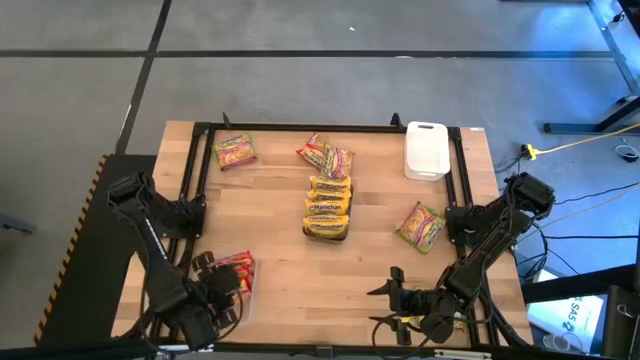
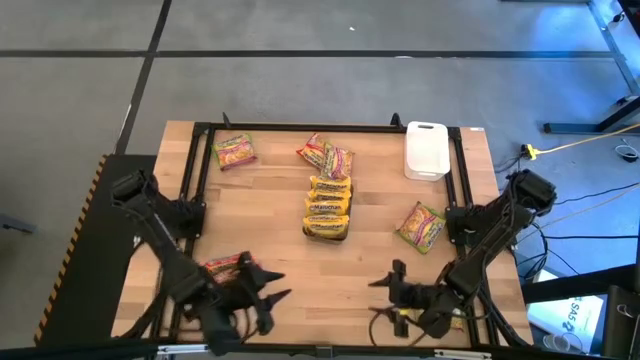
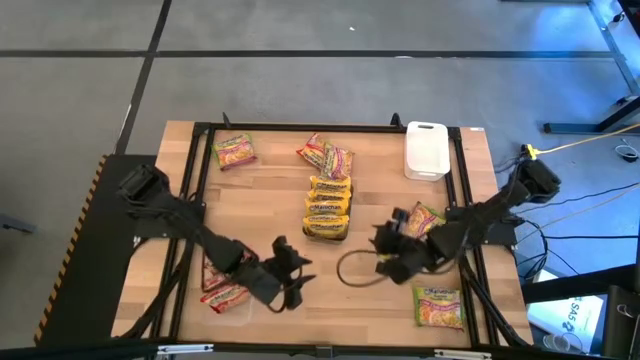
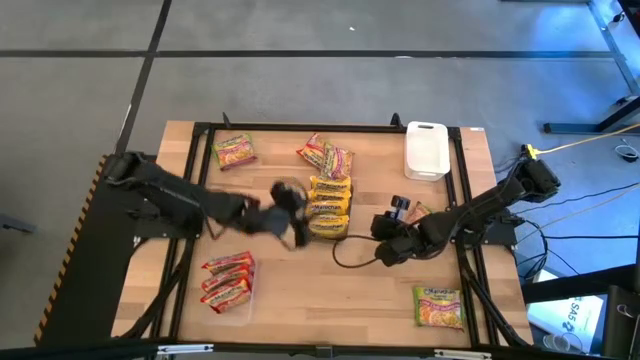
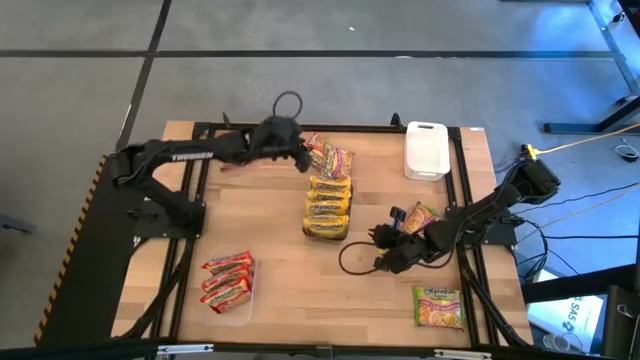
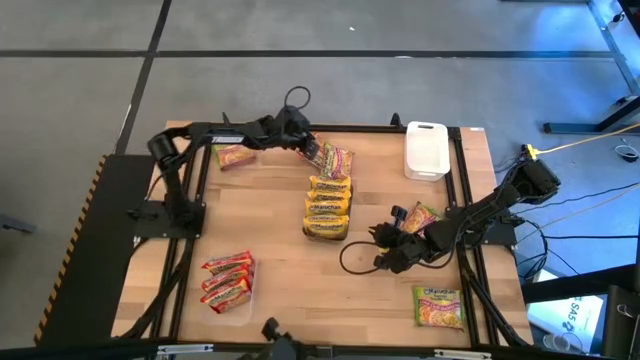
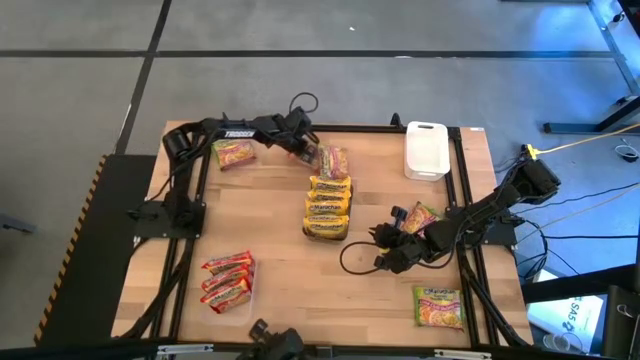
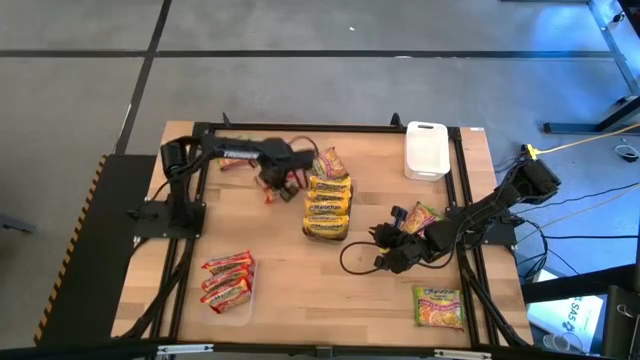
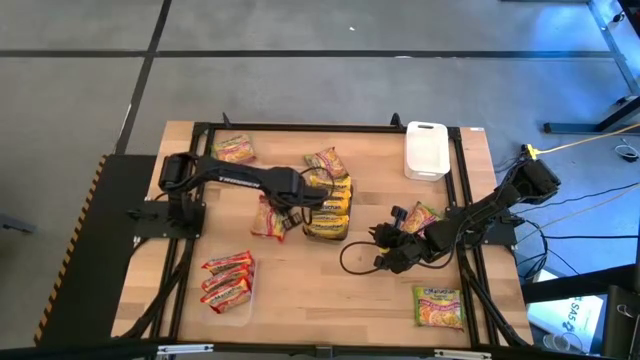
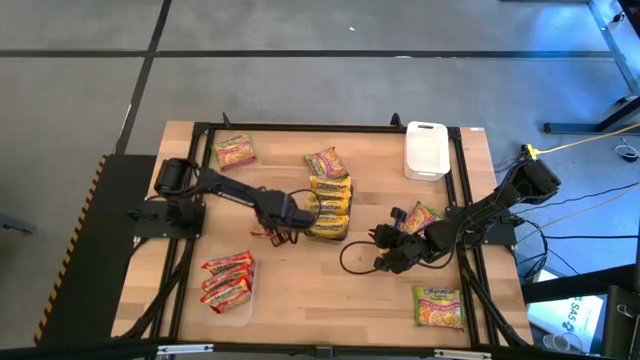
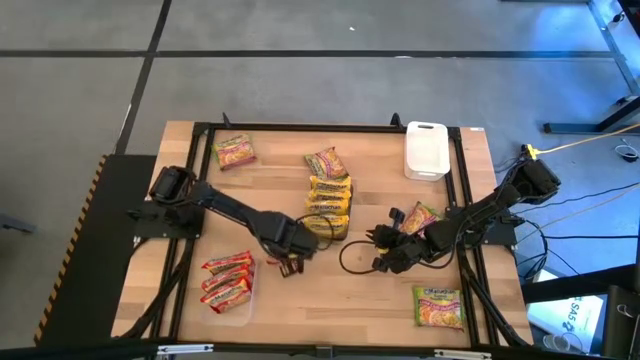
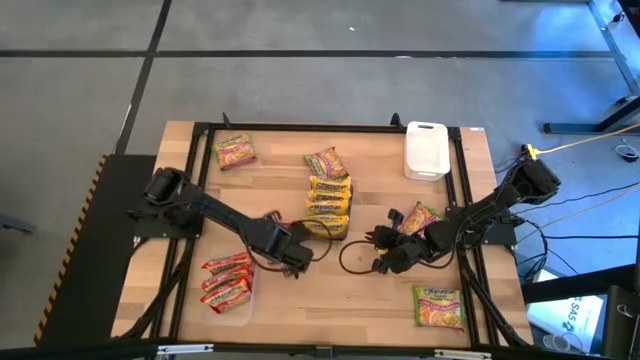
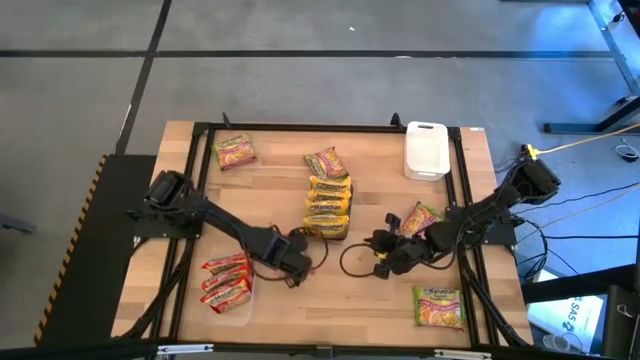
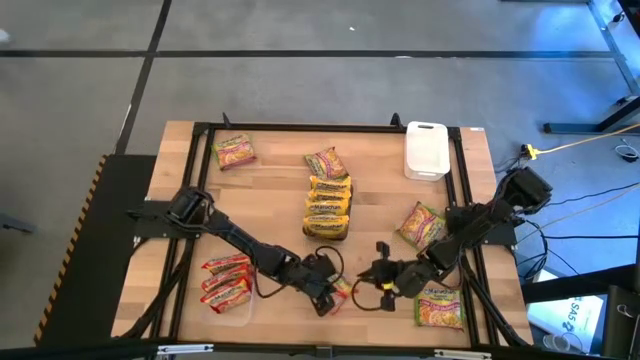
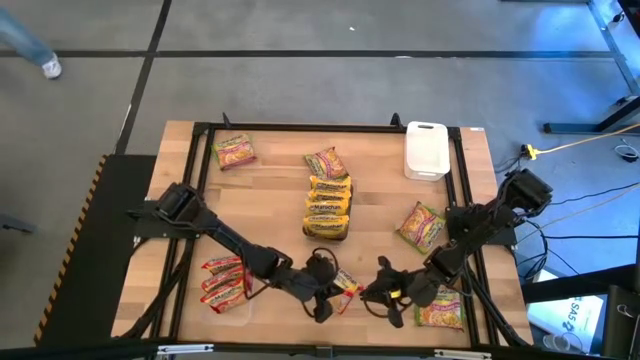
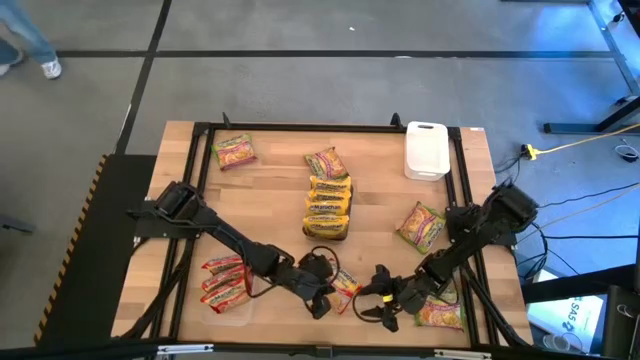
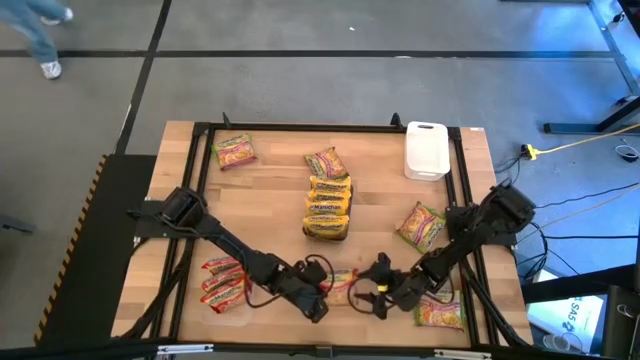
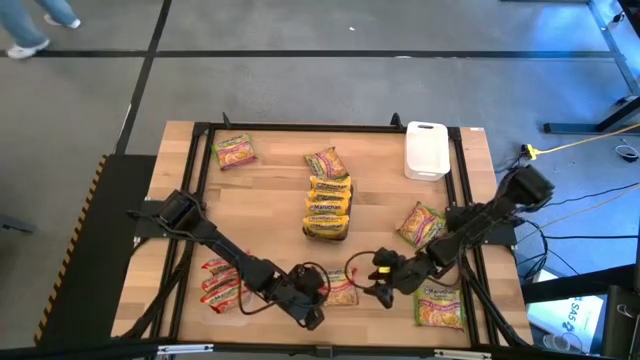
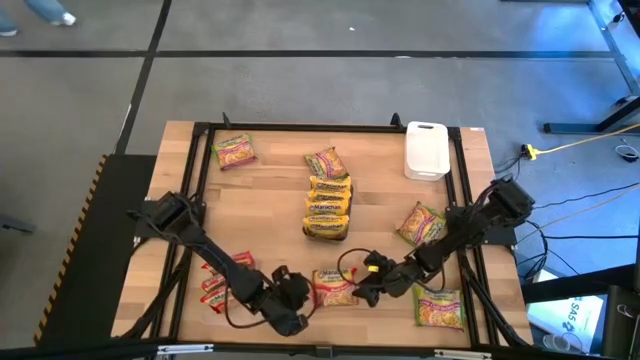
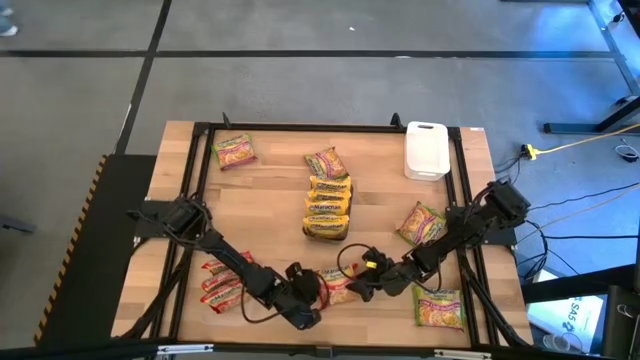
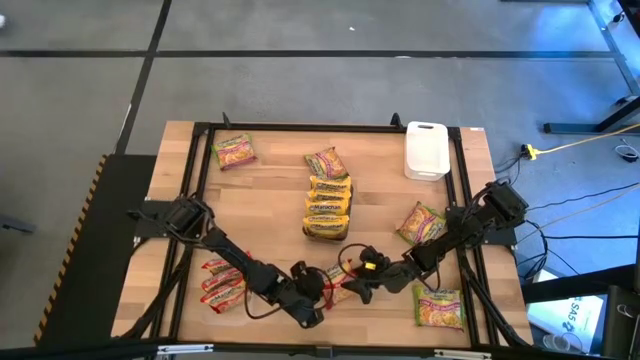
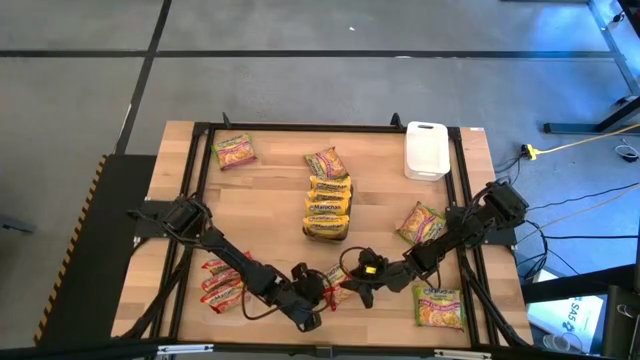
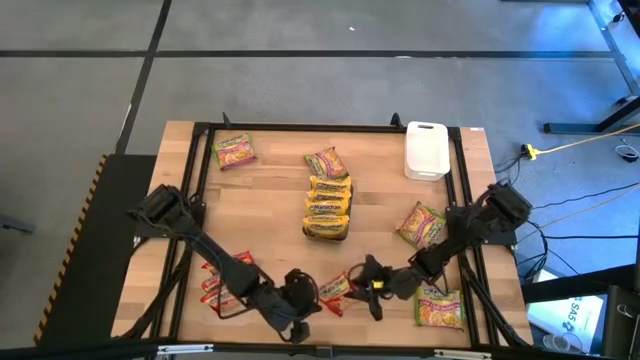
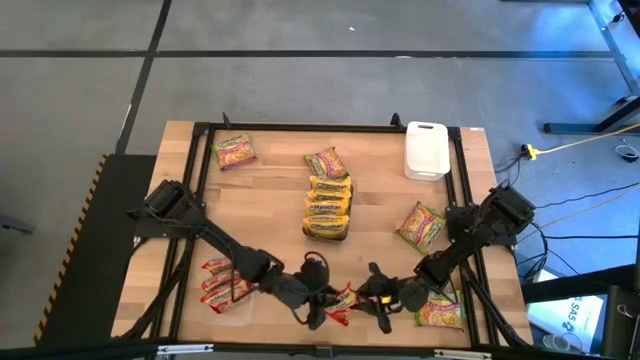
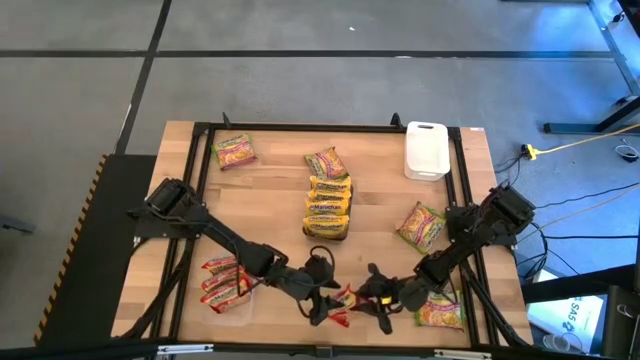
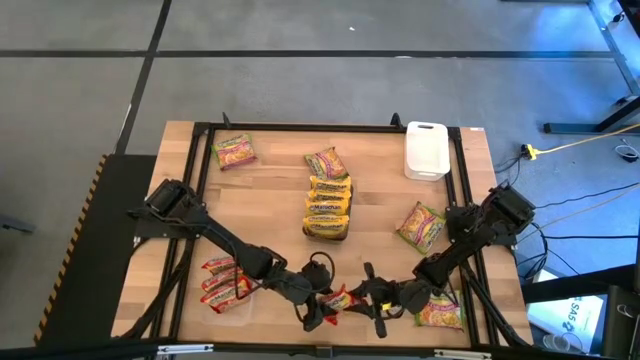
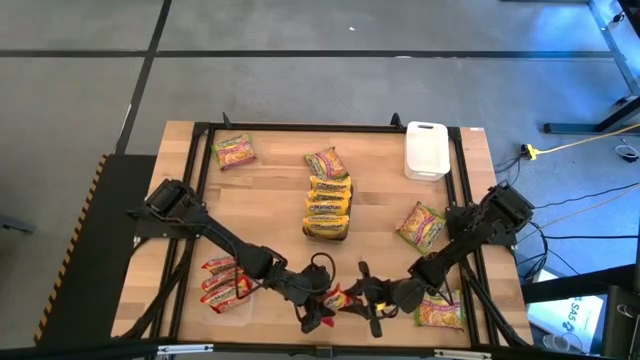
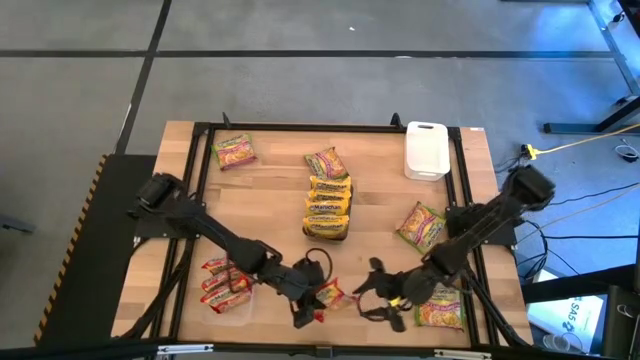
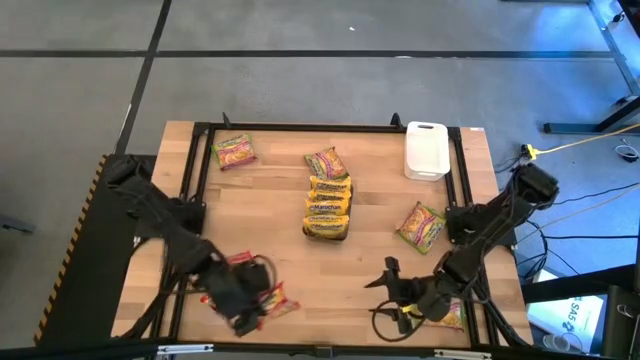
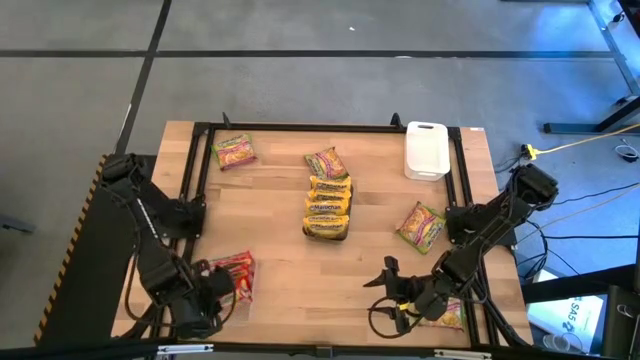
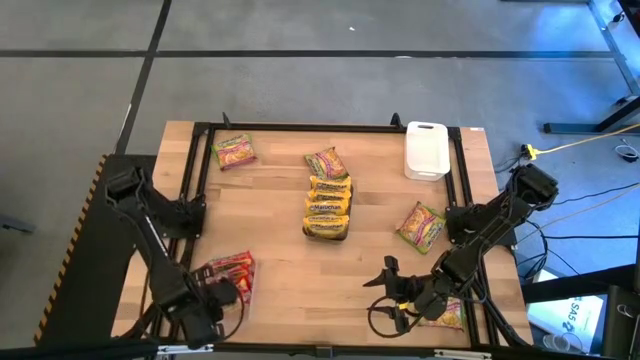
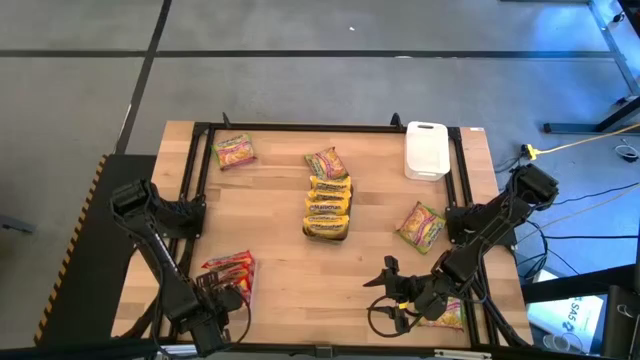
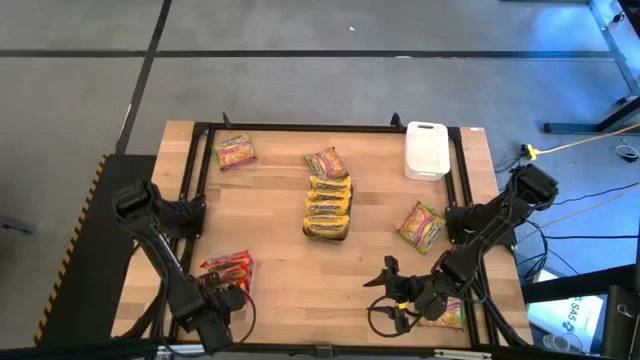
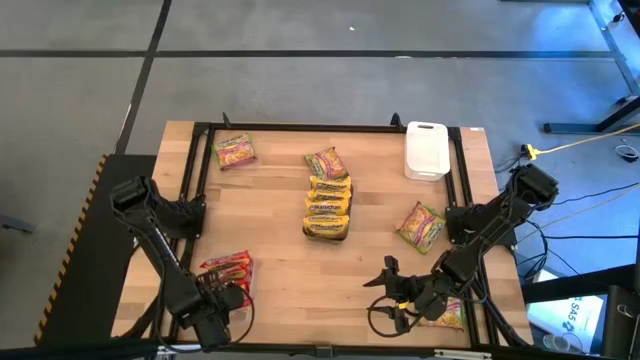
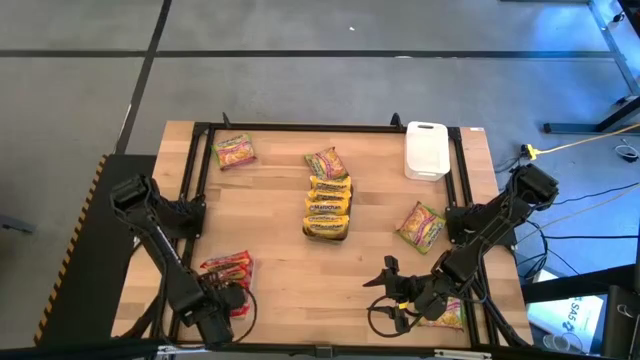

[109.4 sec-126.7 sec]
Task: Sort Maruchan noodles
Put the red noodle pack into the transparent bin

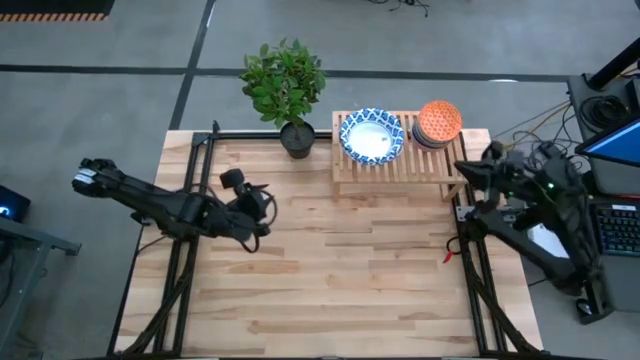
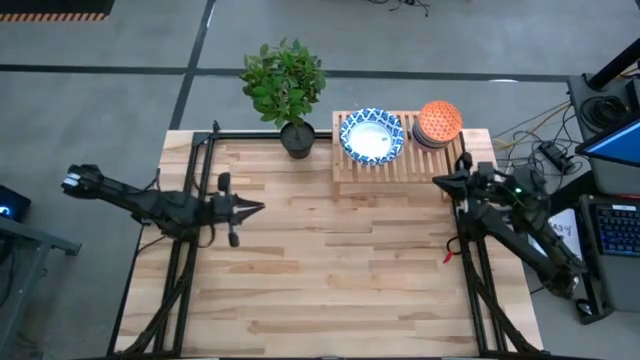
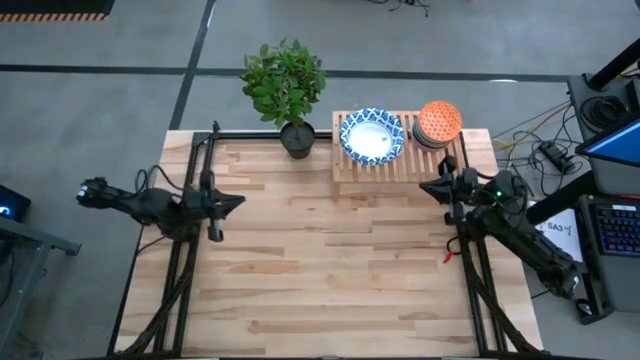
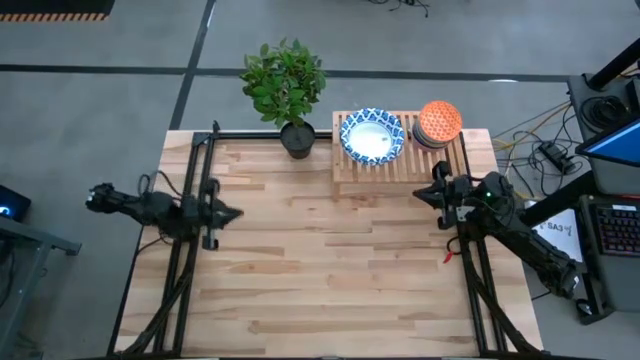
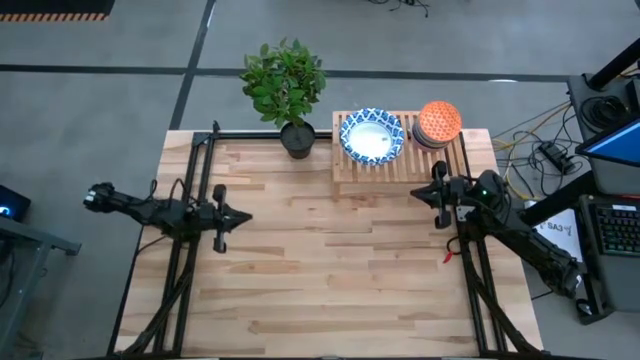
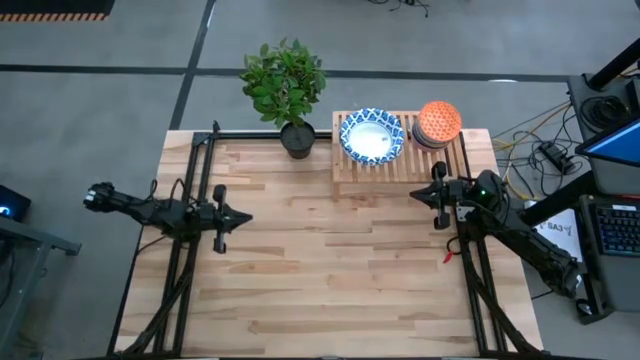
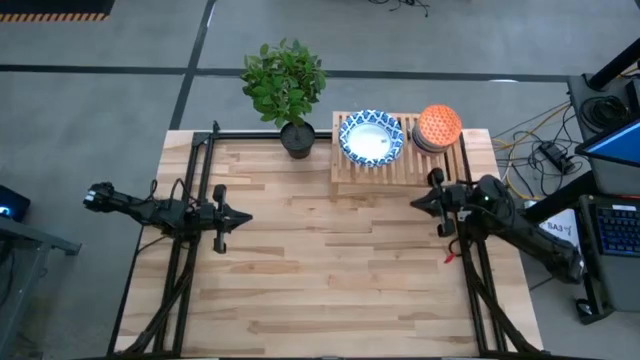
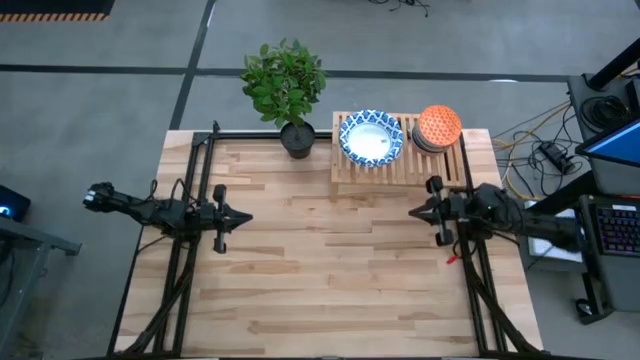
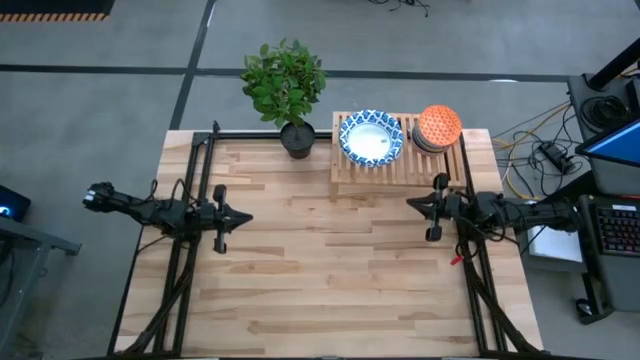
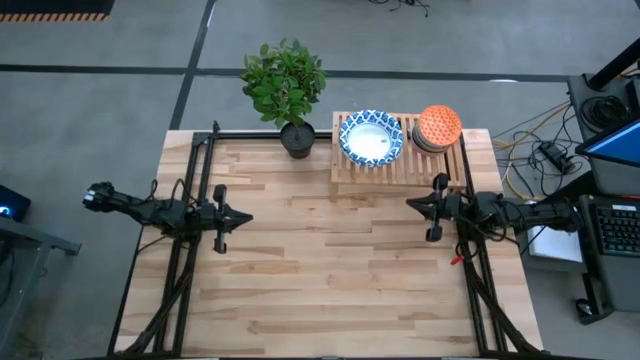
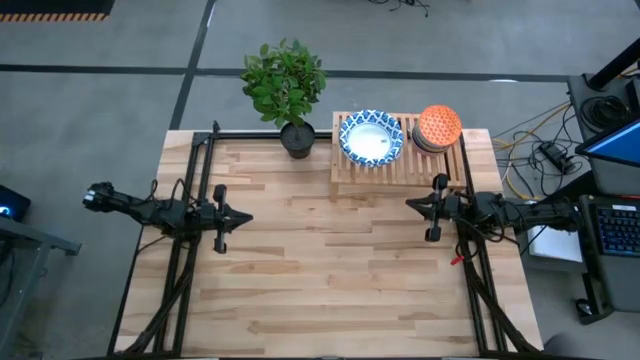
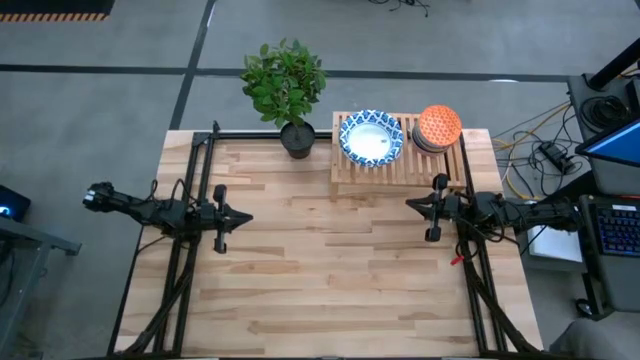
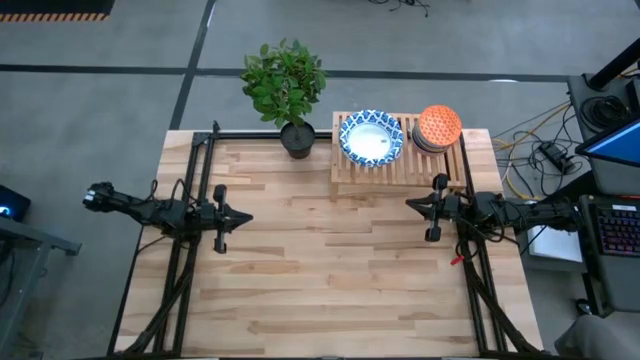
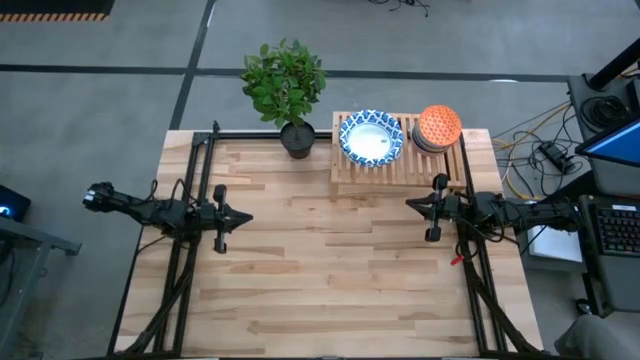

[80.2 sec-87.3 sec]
Task: Place and stack bowls onto a shelf
Return to Home Position
